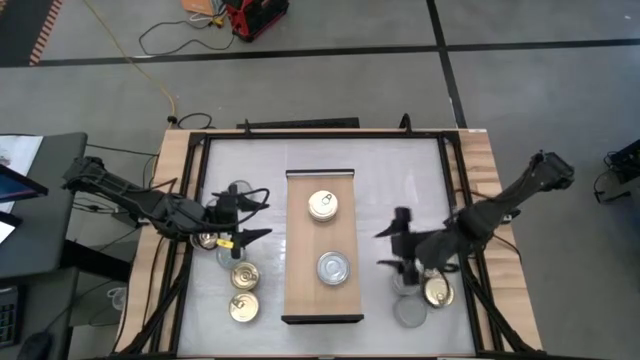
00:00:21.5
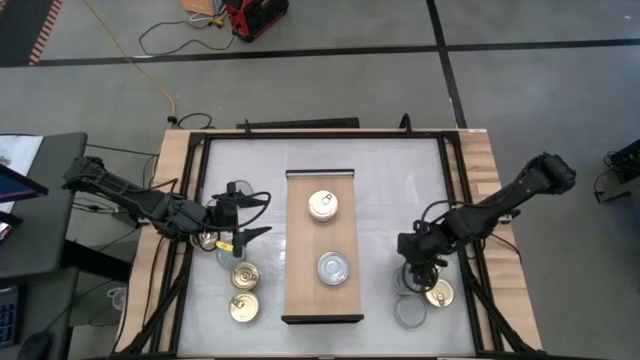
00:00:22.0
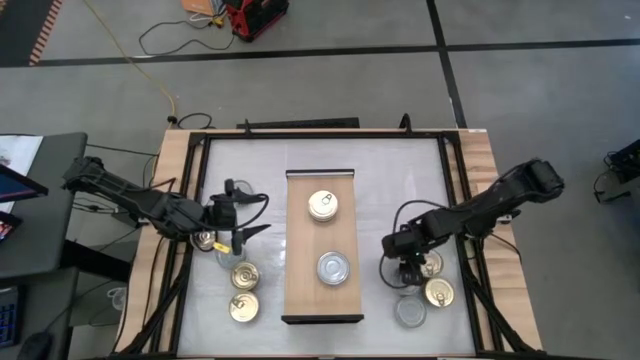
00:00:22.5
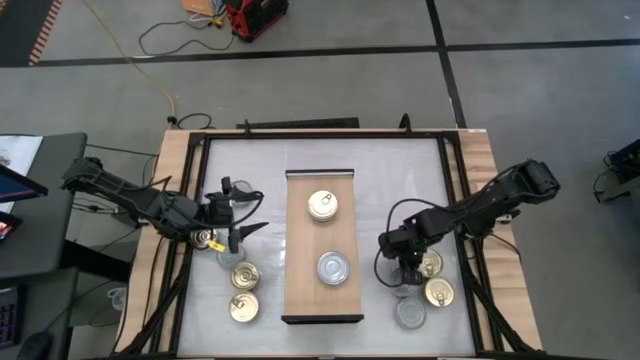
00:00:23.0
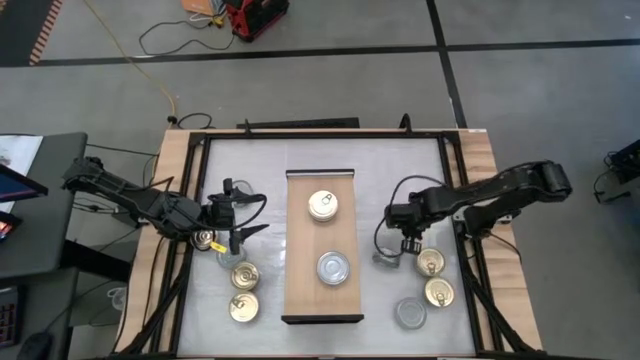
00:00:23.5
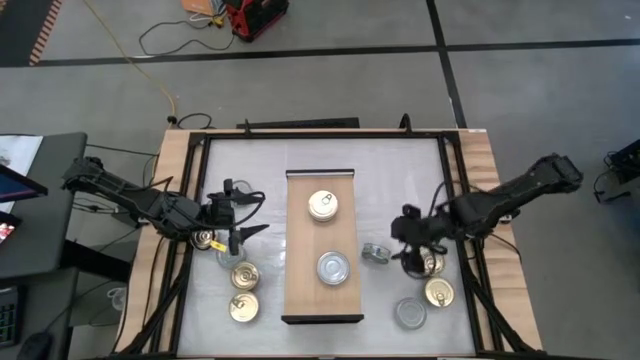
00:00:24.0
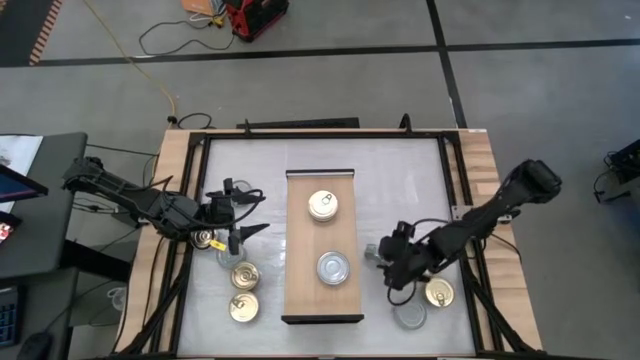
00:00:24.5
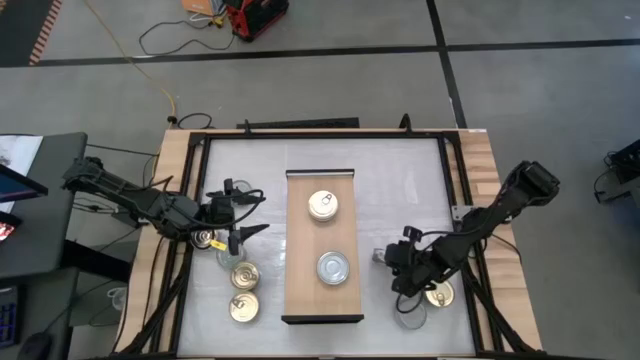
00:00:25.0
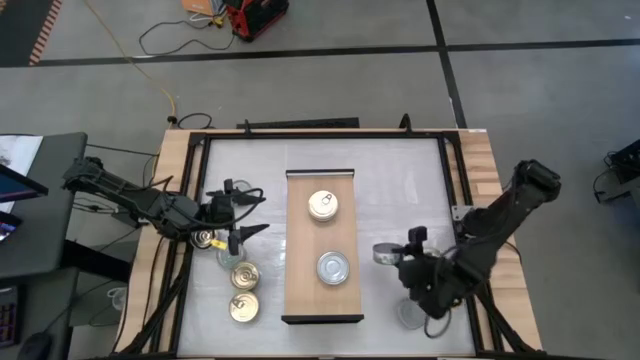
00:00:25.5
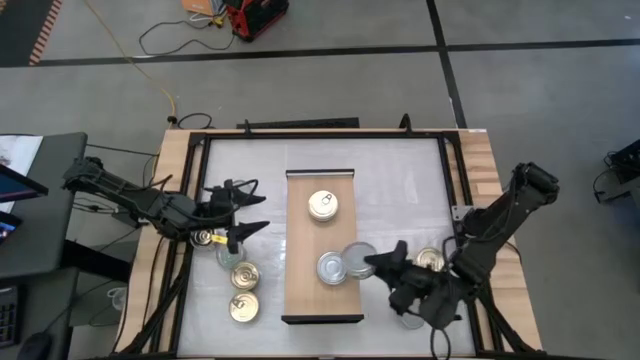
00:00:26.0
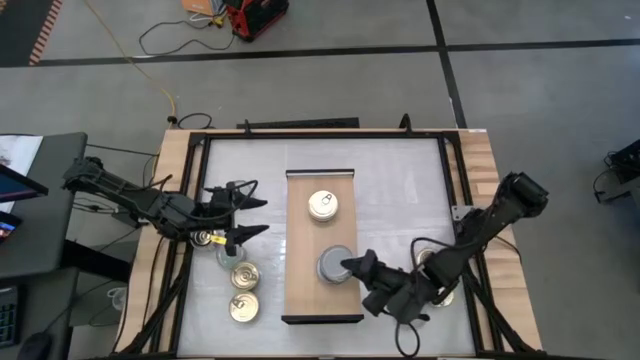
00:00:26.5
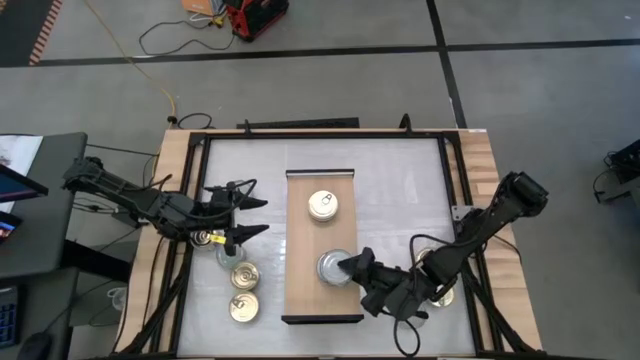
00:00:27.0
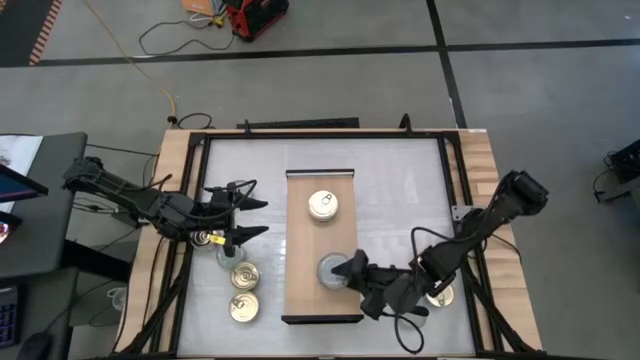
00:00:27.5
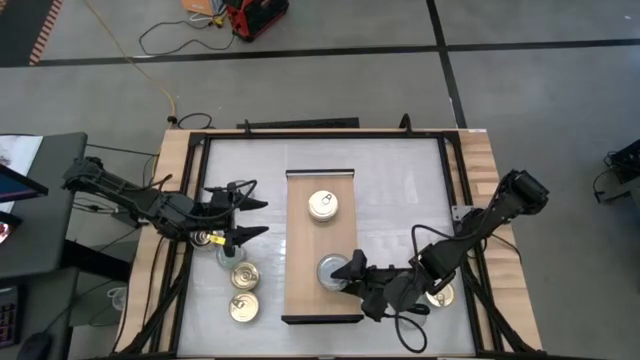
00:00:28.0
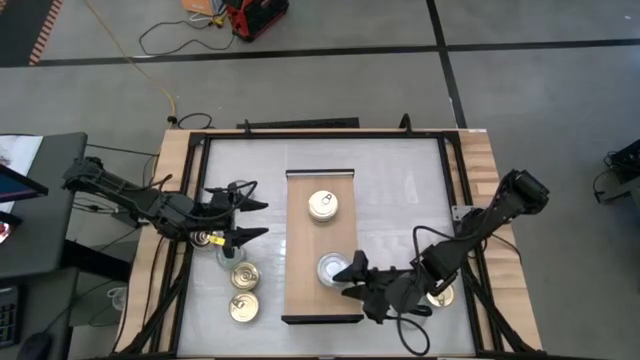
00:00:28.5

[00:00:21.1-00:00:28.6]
Task: Stack canned seafood by type on shelf
Stack the green tuna can on top of the green tuna can on the shelf

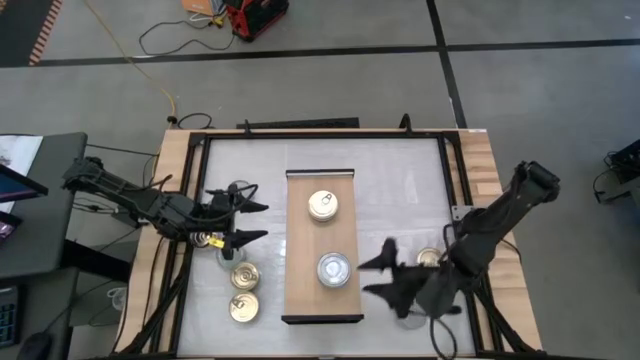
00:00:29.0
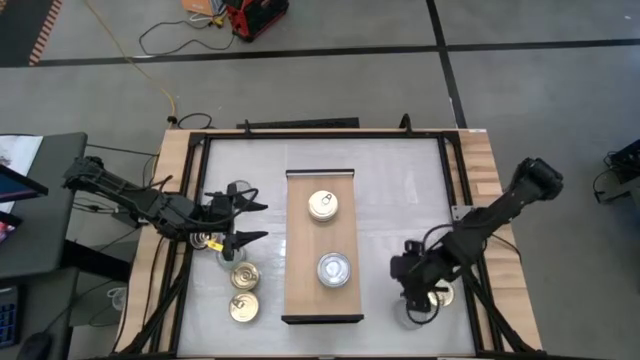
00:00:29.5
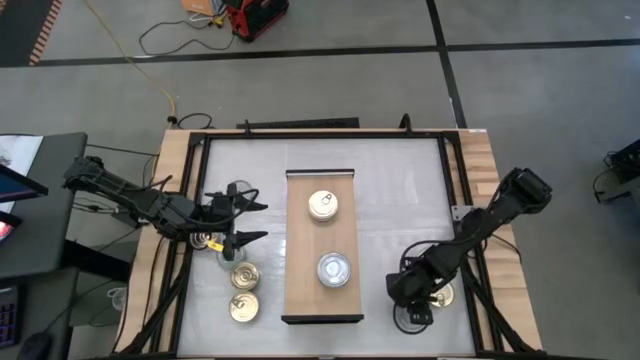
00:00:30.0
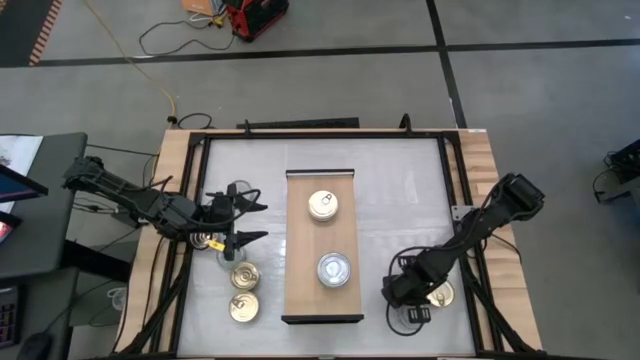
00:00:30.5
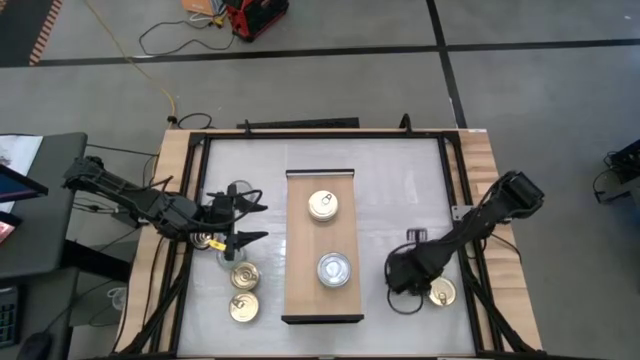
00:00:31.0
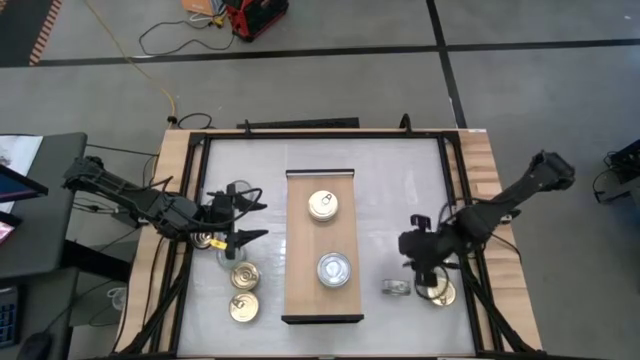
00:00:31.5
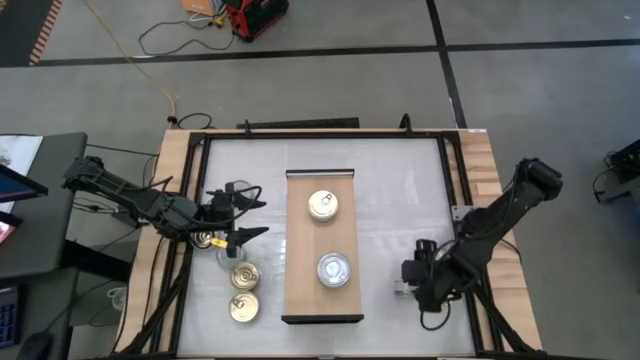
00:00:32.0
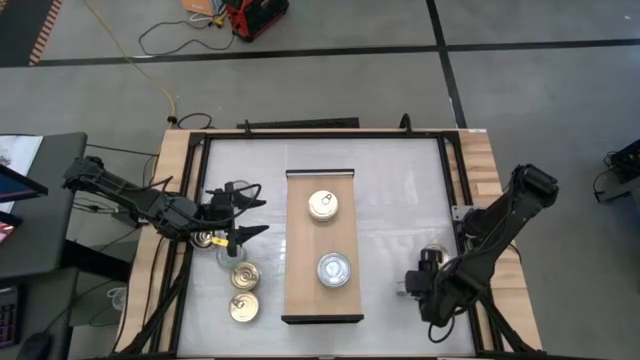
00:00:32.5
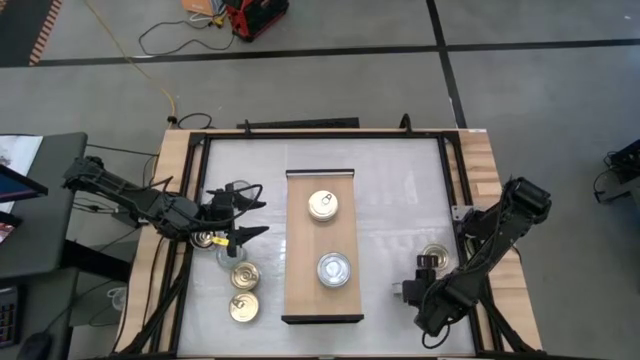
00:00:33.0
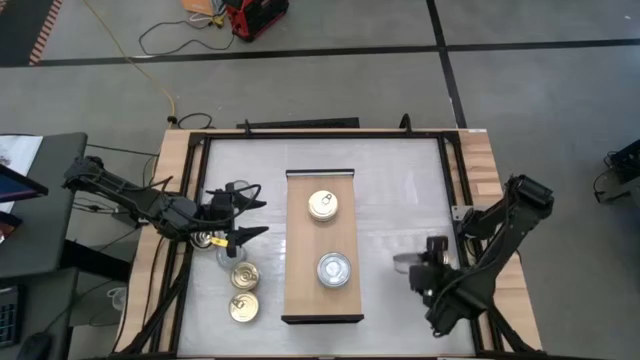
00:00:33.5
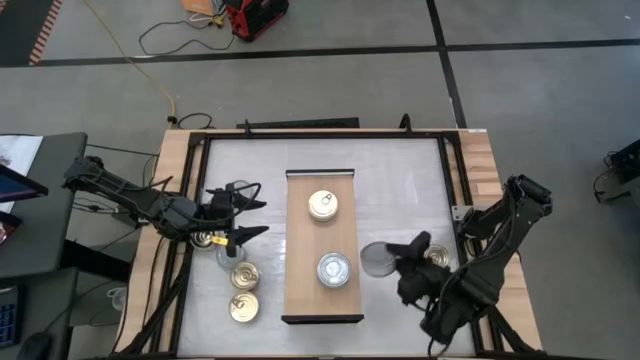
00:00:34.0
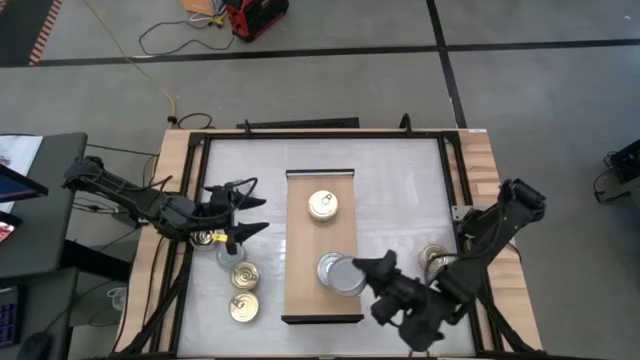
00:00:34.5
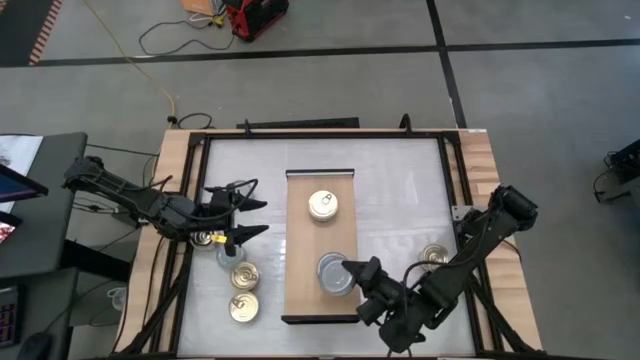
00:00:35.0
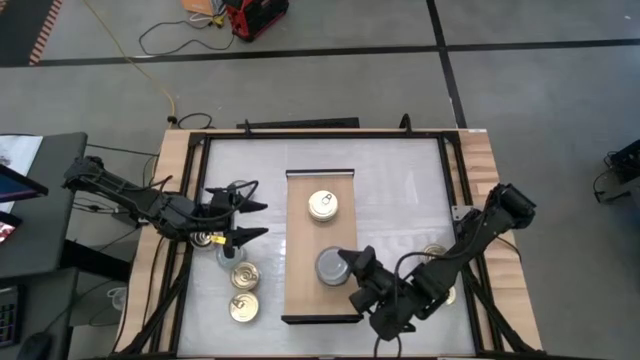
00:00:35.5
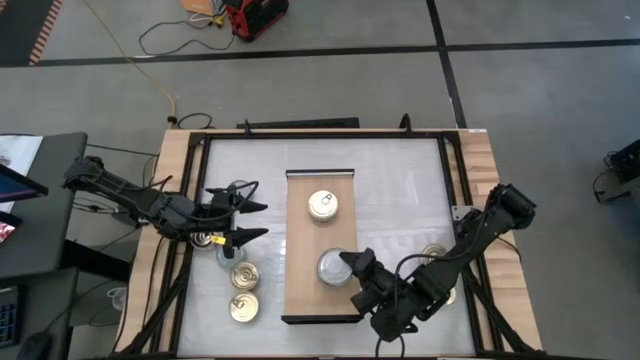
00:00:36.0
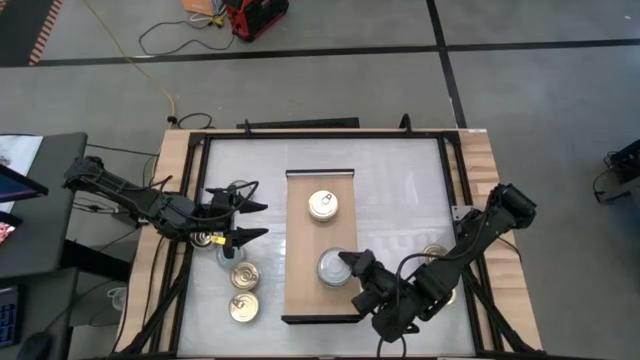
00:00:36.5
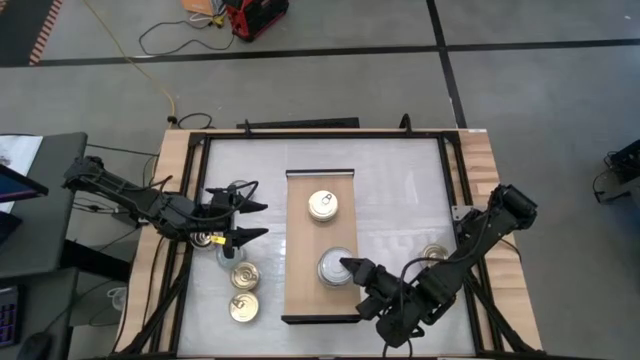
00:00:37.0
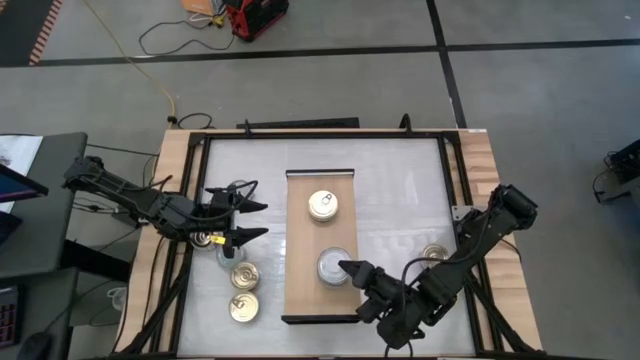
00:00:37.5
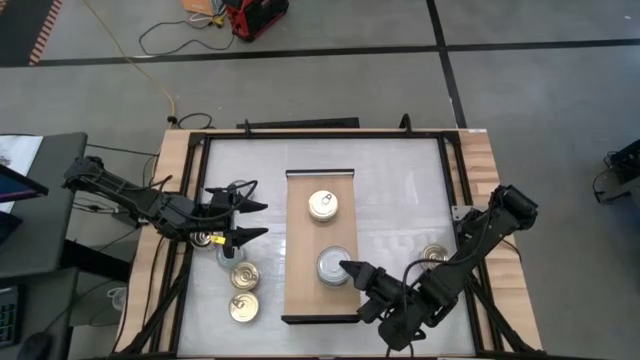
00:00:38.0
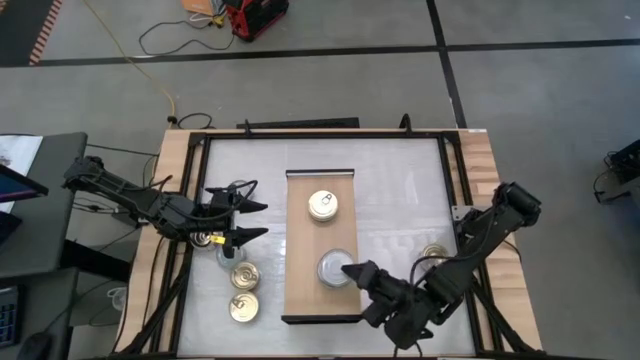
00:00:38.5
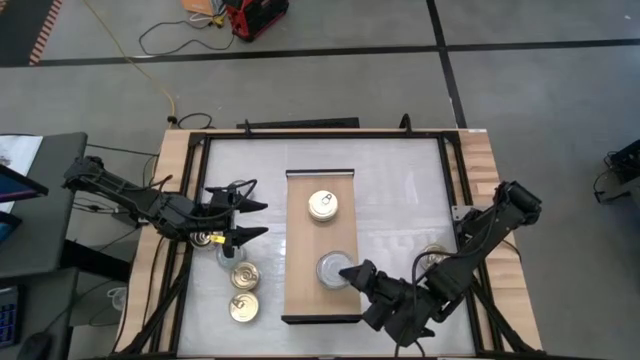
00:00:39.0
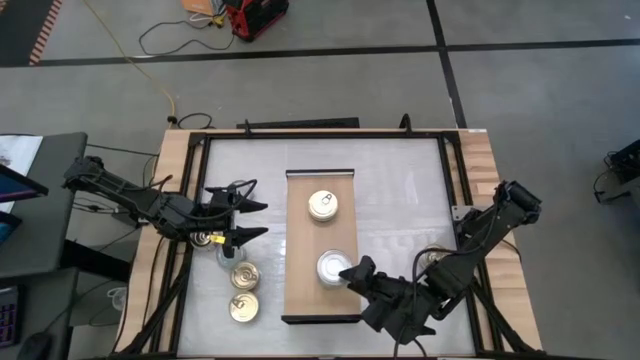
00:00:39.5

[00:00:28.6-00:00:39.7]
Stack the green tuna can on top of the stacked green tuna cans on the shelf

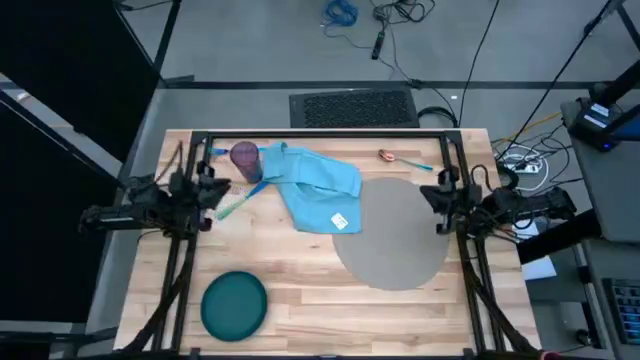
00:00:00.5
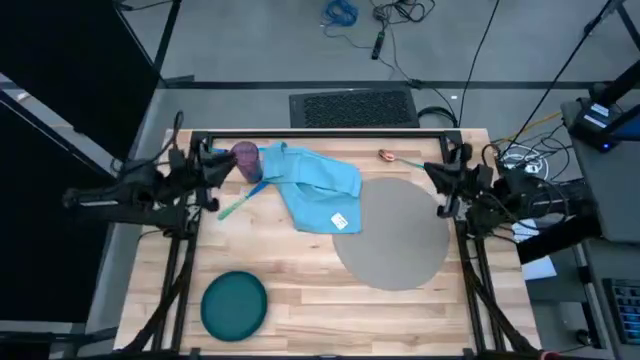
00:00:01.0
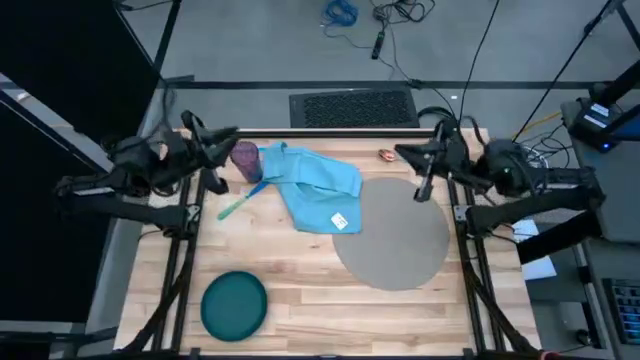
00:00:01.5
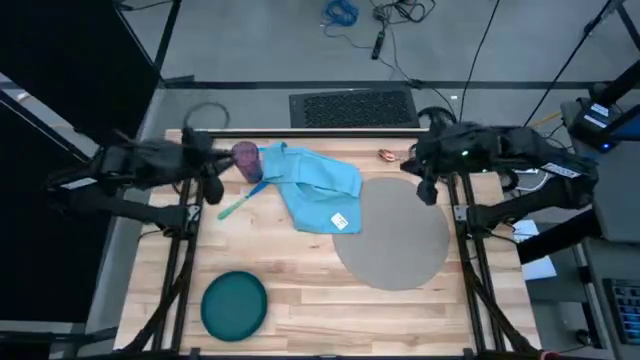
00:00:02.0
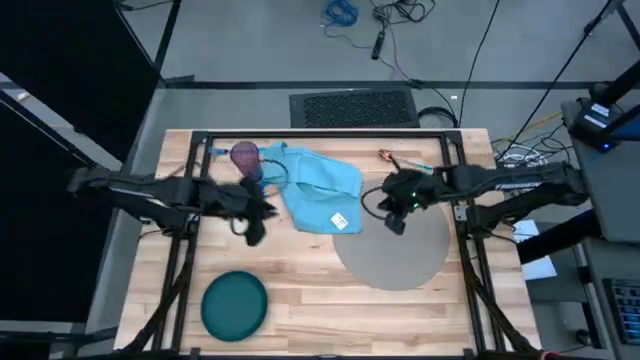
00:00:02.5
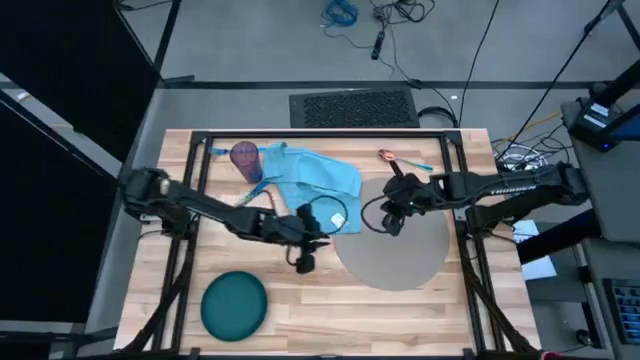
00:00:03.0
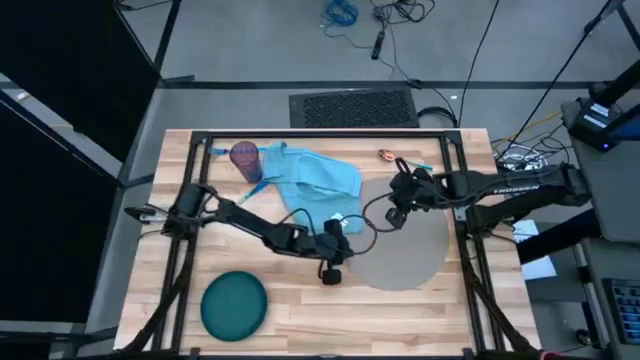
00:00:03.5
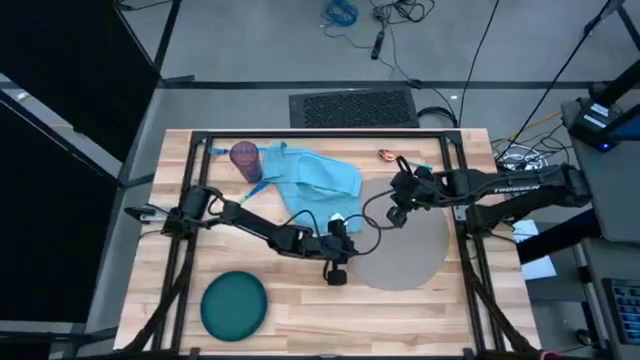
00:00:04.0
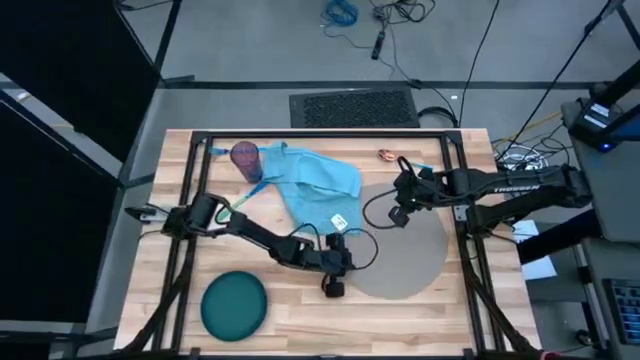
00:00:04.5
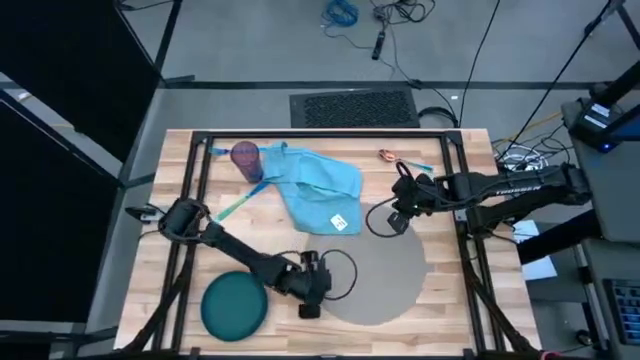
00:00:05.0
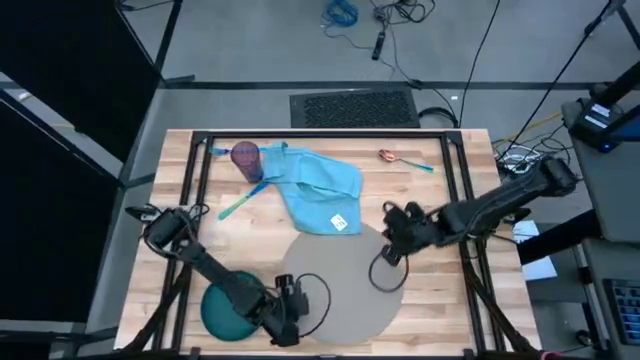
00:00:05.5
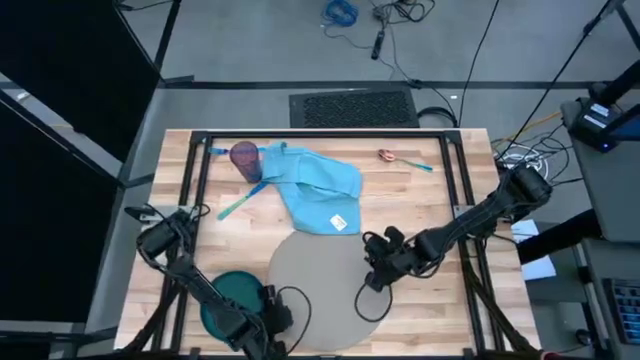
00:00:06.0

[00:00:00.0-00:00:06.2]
Task: Set table place
Move the gray mat to the bottom center of the table
